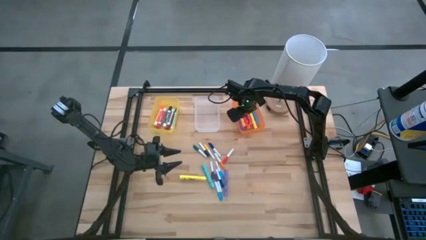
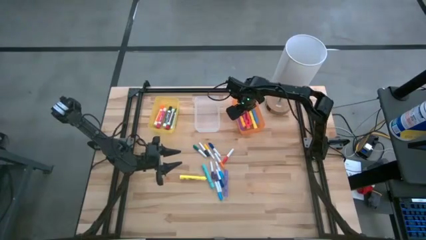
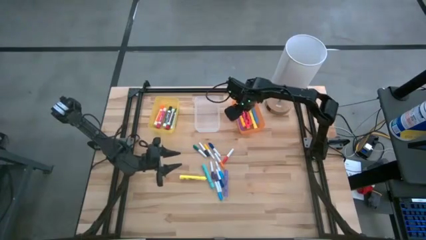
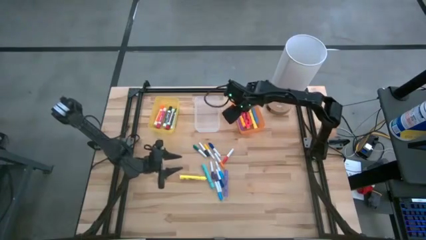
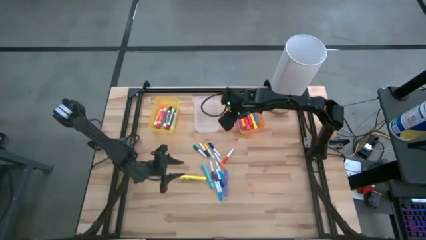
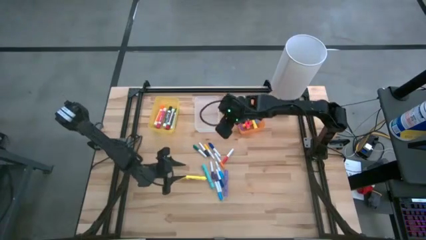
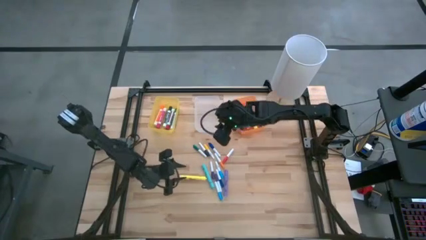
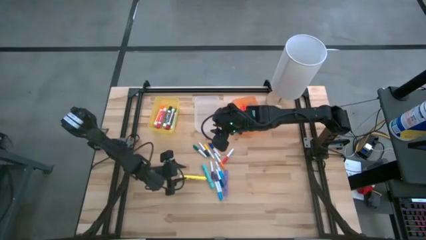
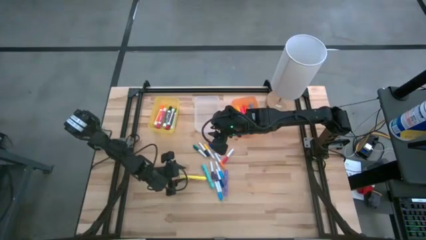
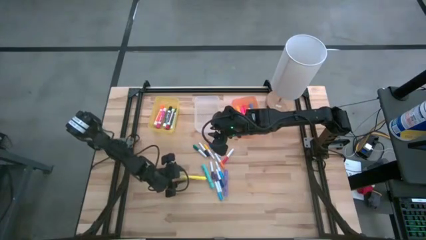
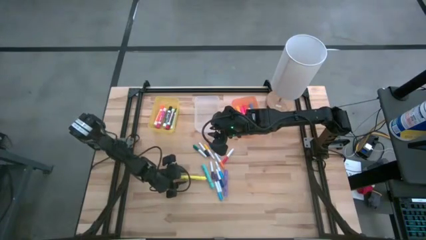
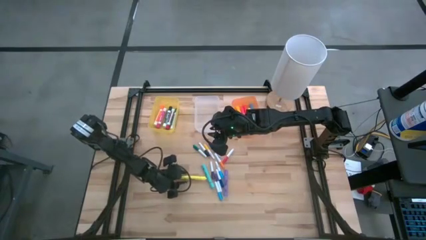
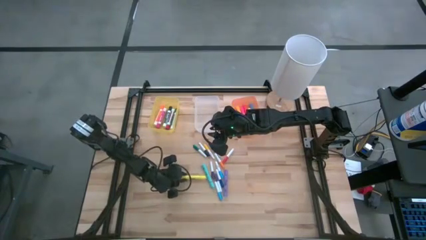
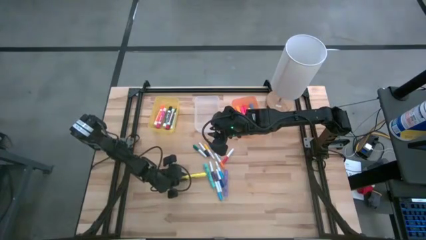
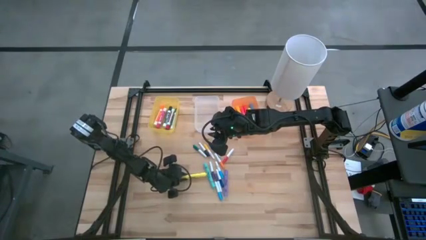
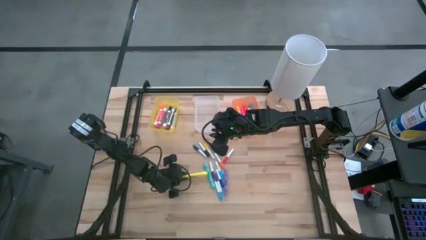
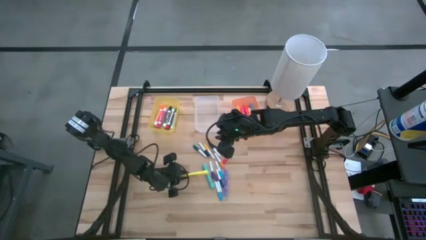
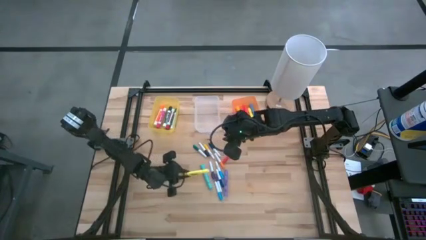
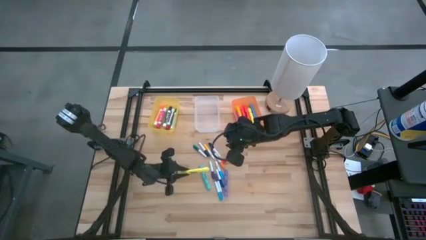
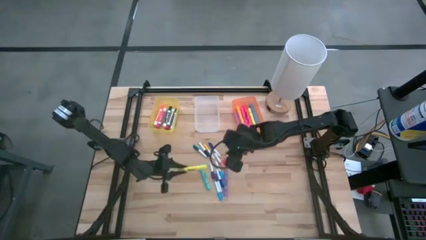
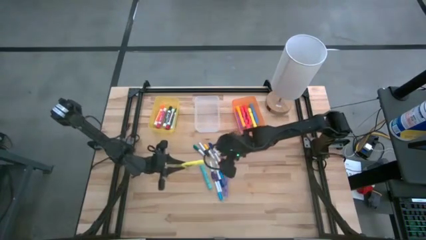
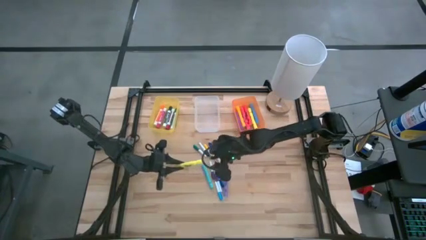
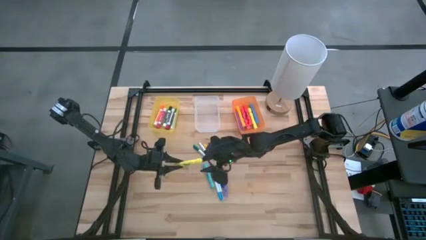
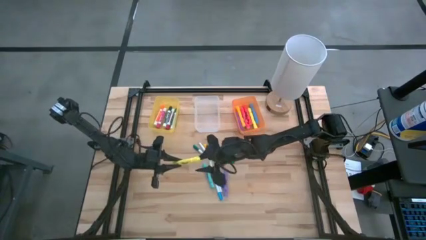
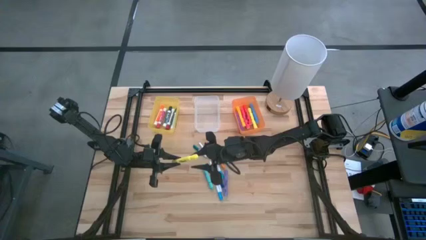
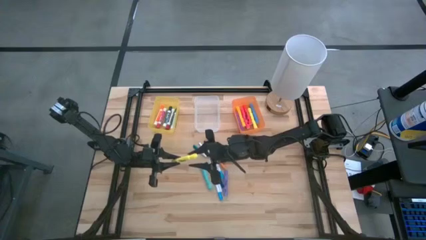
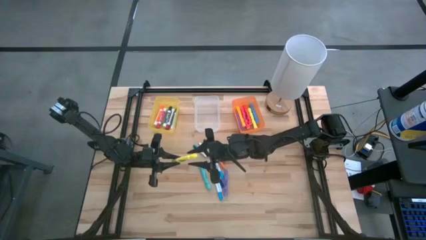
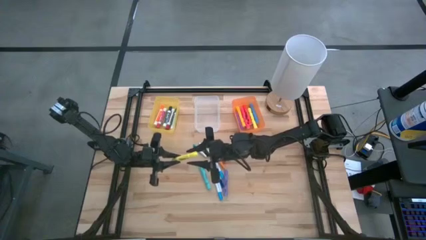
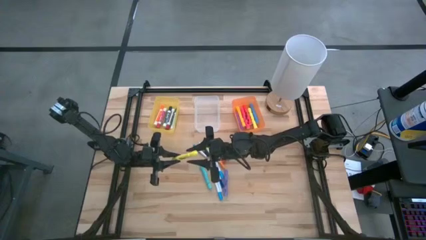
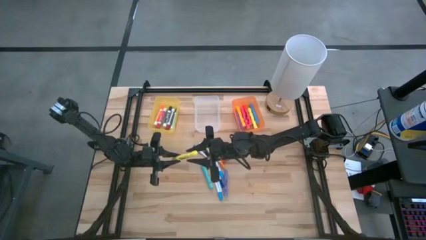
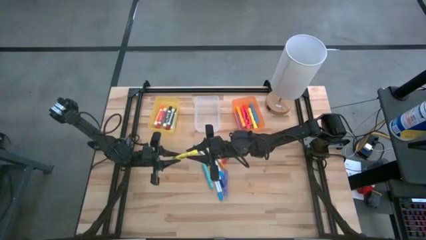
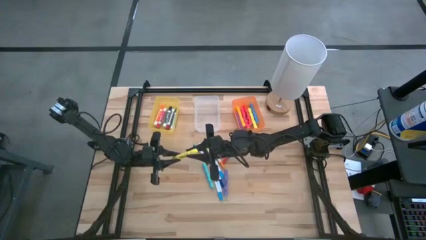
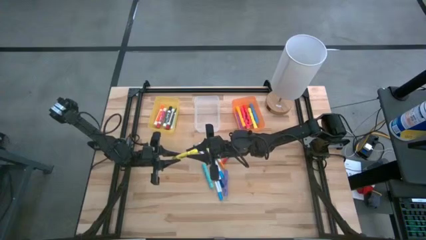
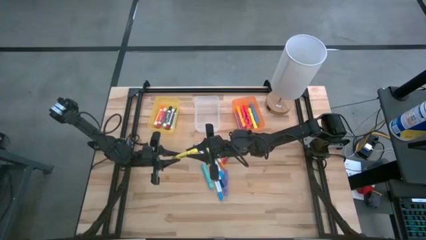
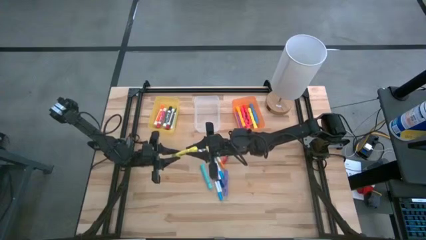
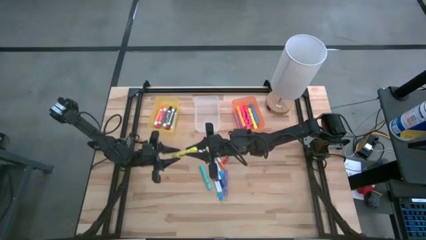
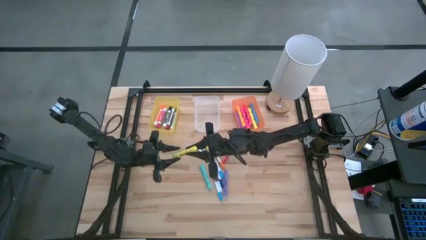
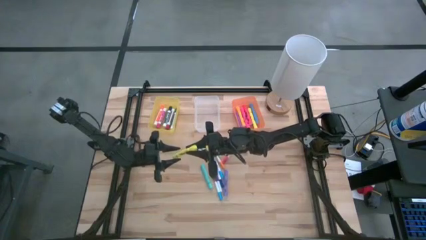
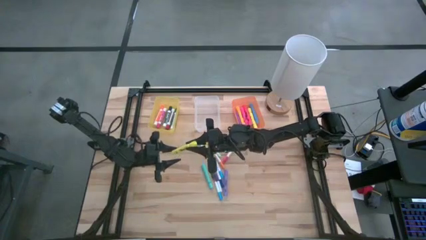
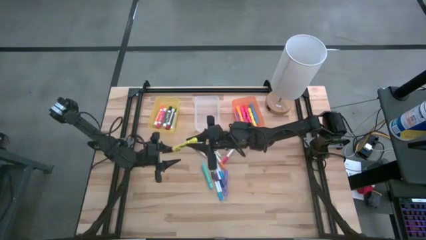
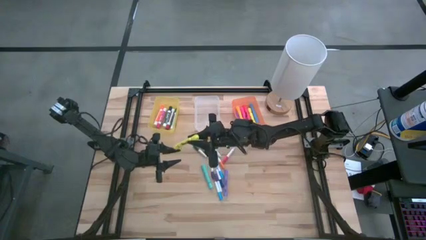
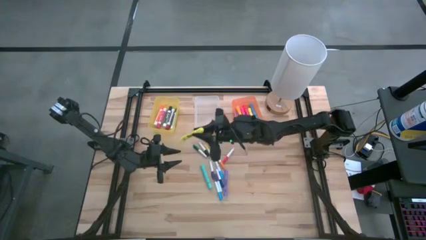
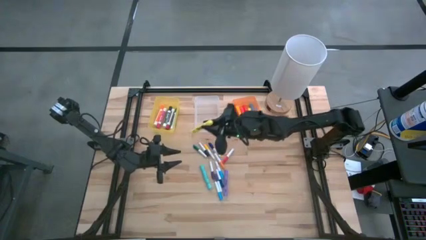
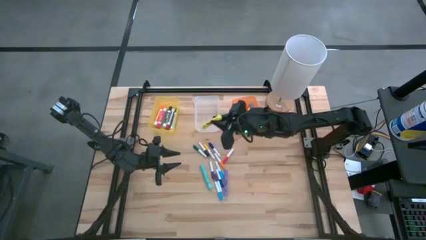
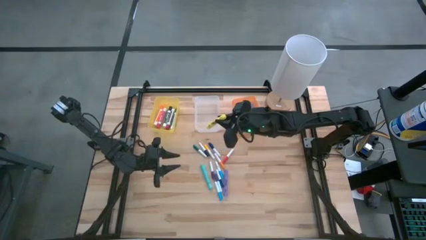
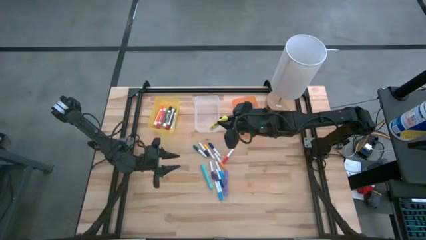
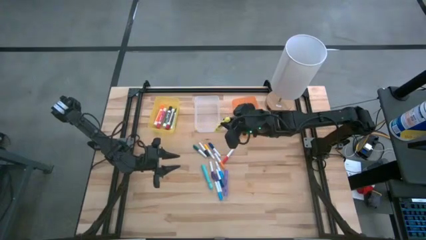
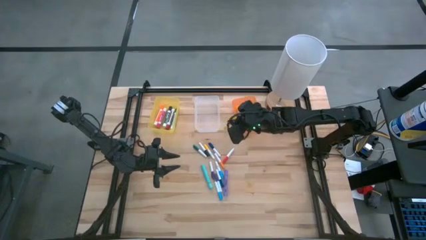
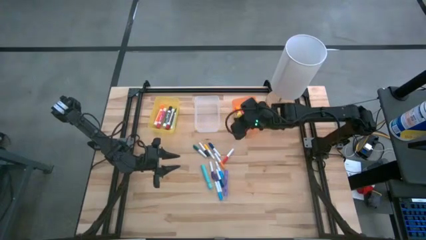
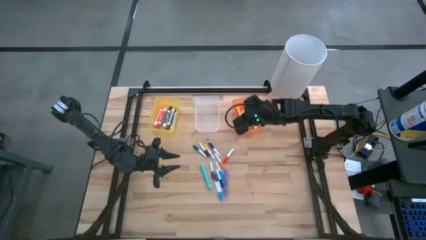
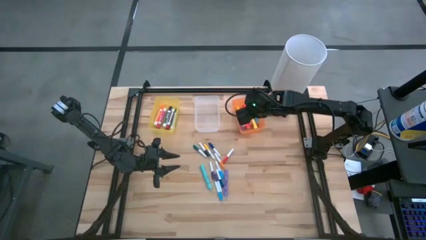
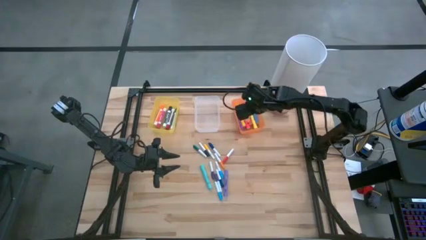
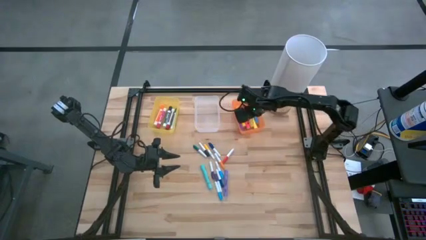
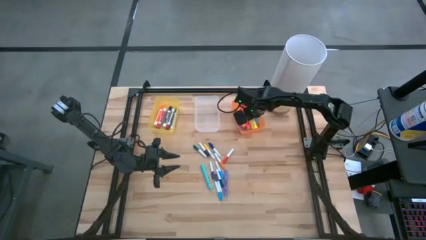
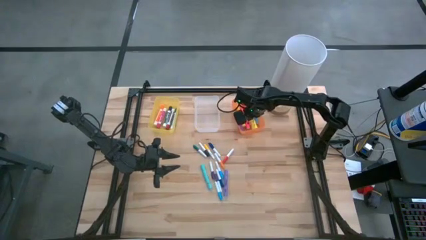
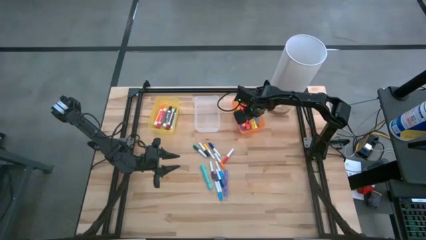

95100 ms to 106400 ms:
Task: Pick & Place Markers
Put the large light yellow highlighter pen into the orange bin

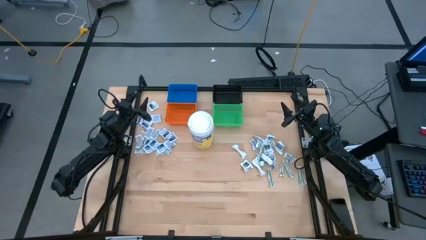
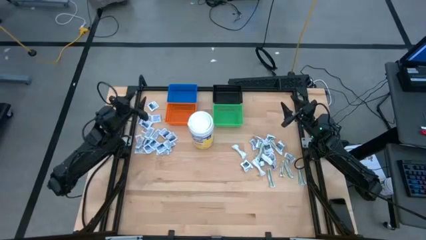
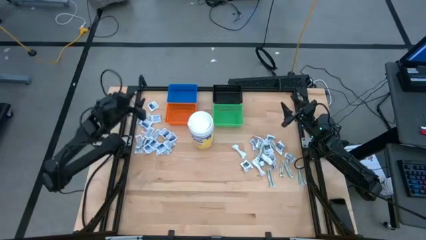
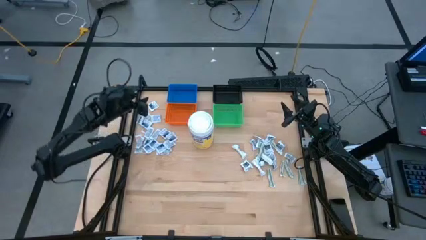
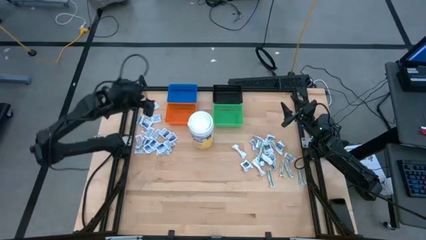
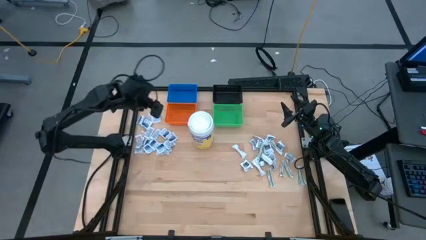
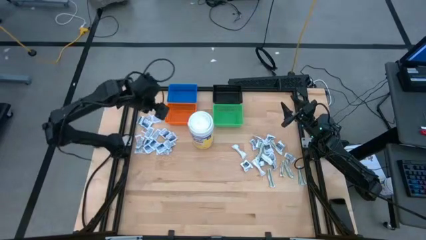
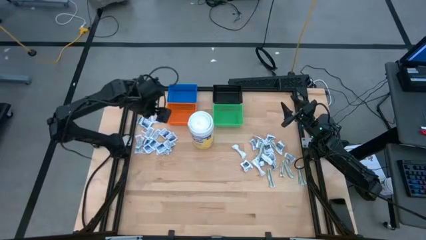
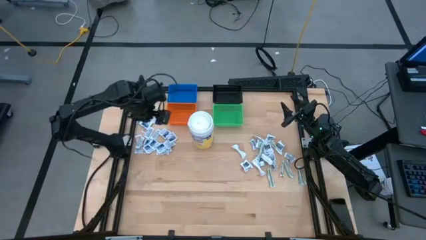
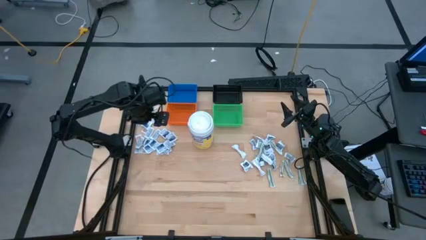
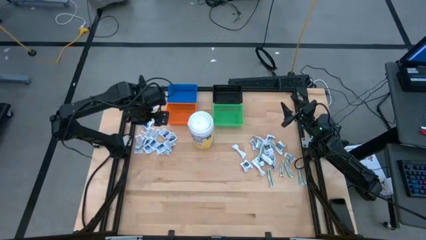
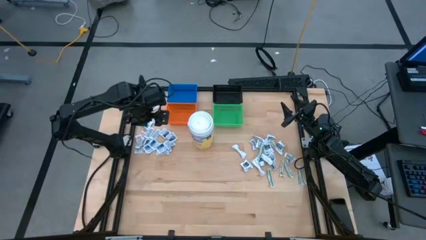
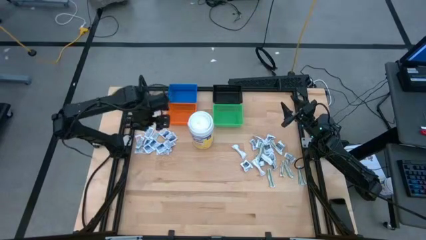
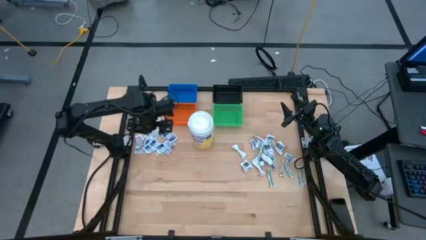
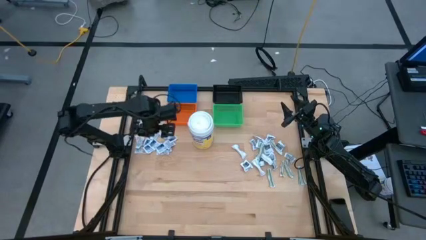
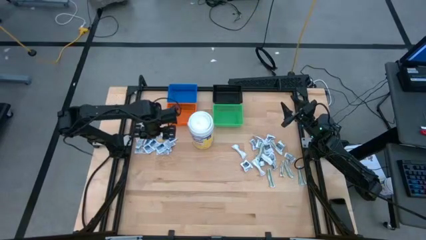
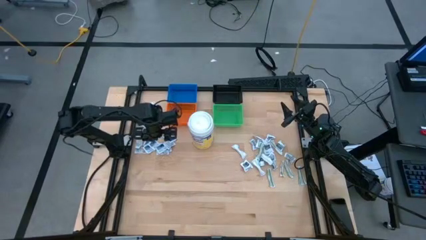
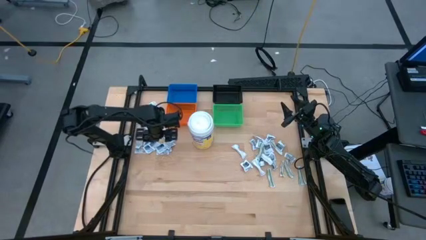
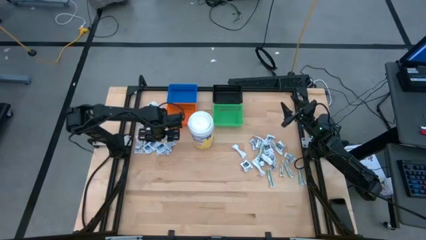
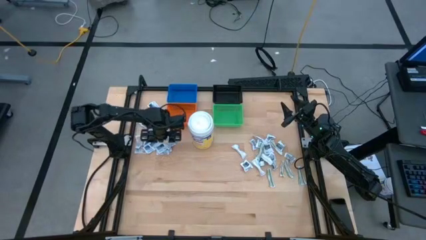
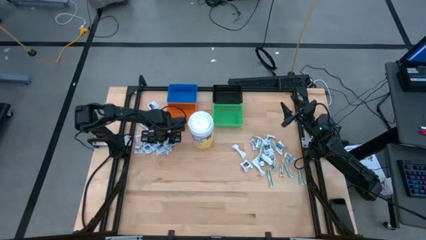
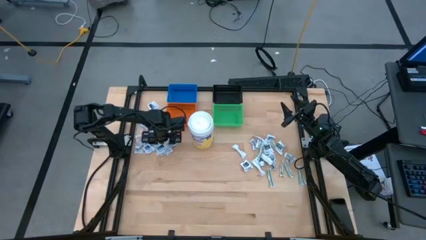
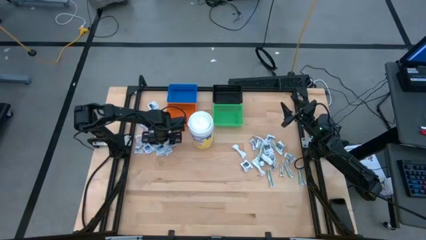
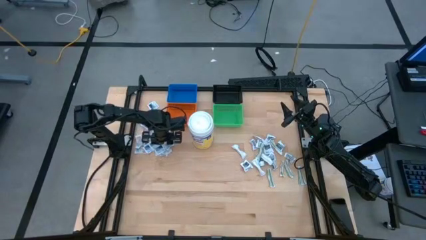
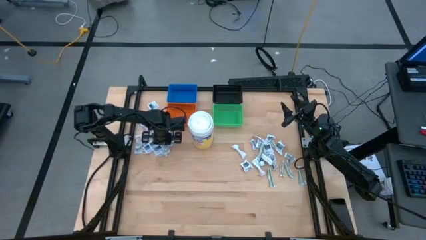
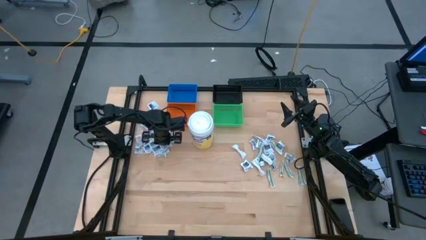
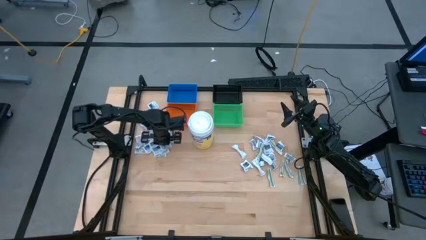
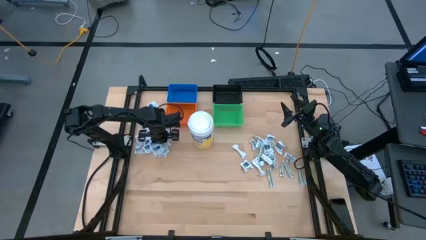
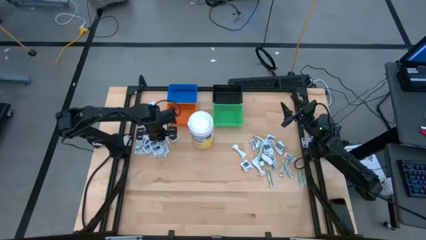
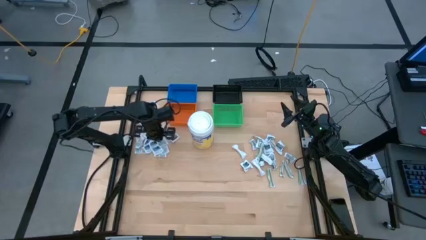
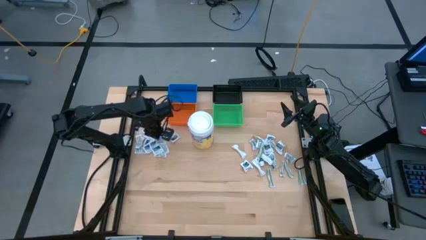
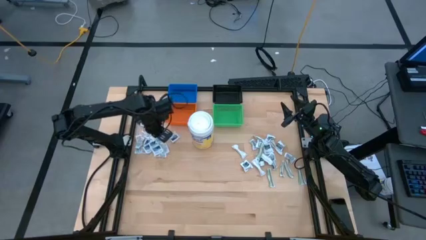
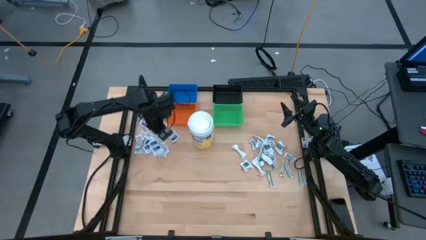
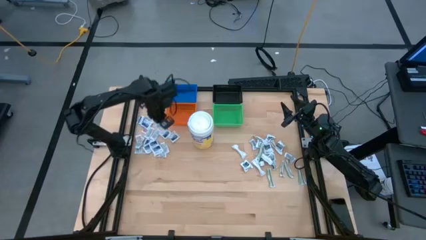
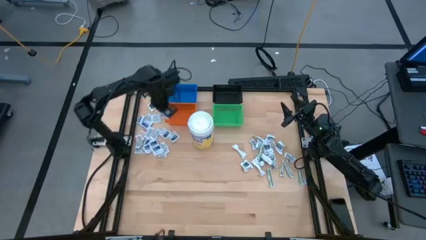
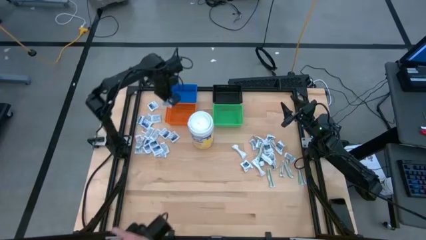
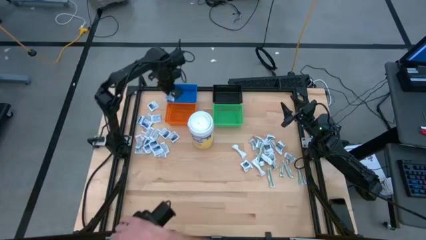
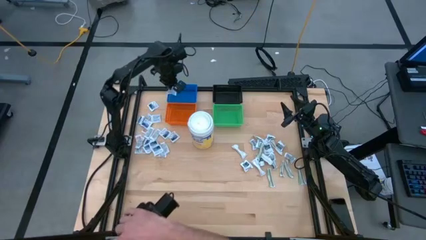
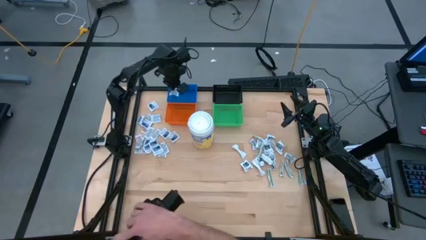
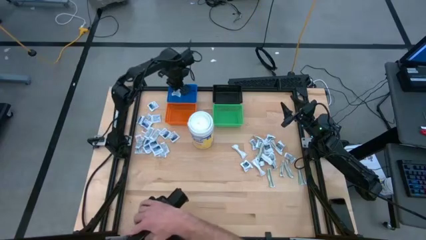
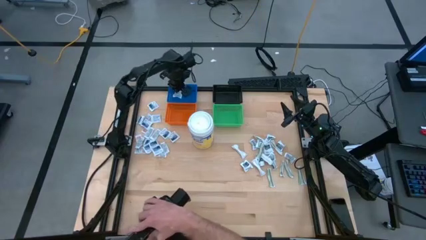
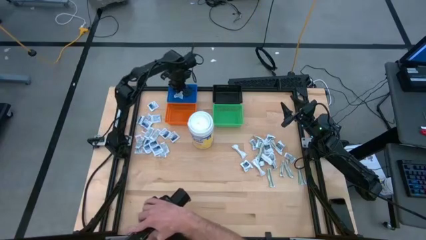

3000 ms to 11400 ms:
Task: Pick & Place First Aid Supplies
Put the blue alcohol pad into the blue bin
